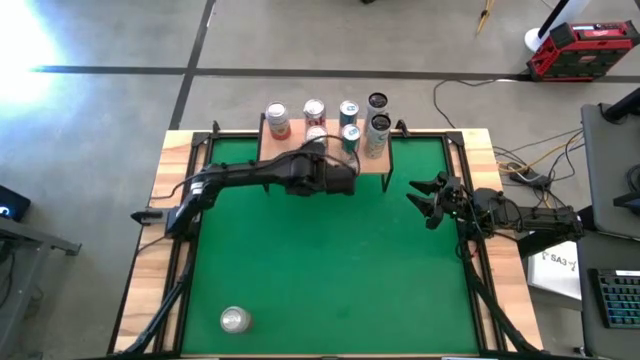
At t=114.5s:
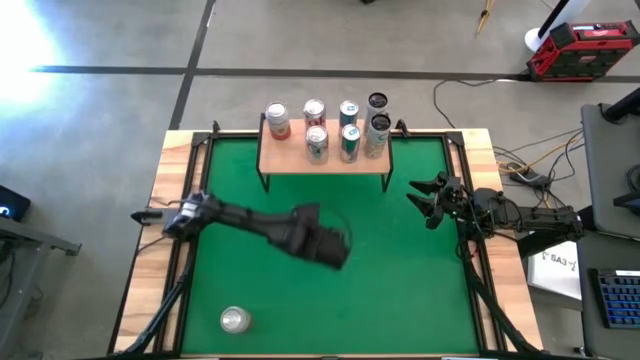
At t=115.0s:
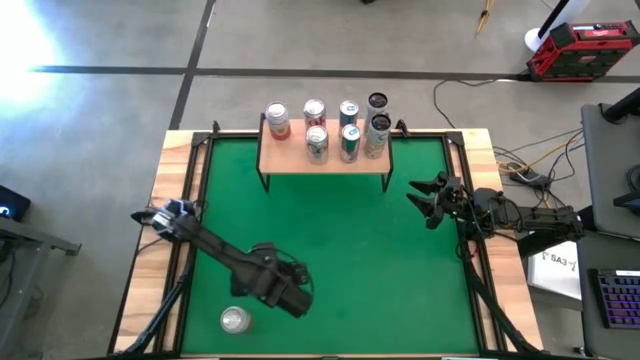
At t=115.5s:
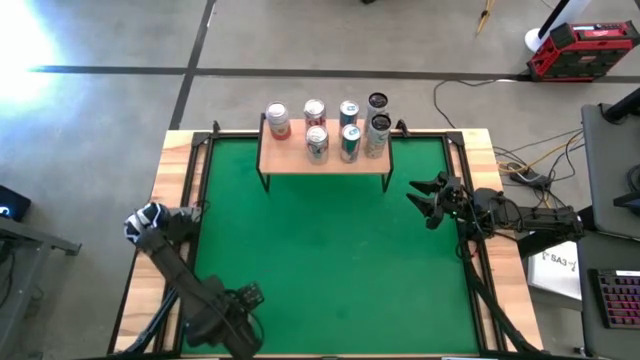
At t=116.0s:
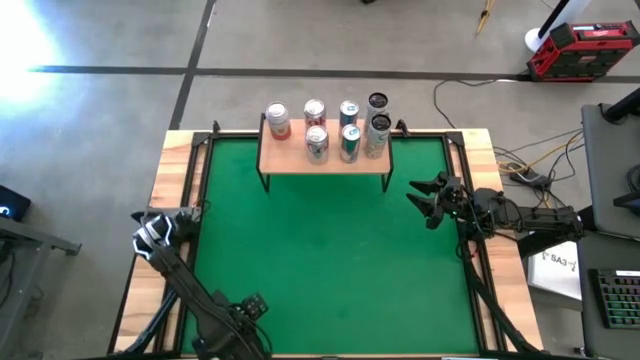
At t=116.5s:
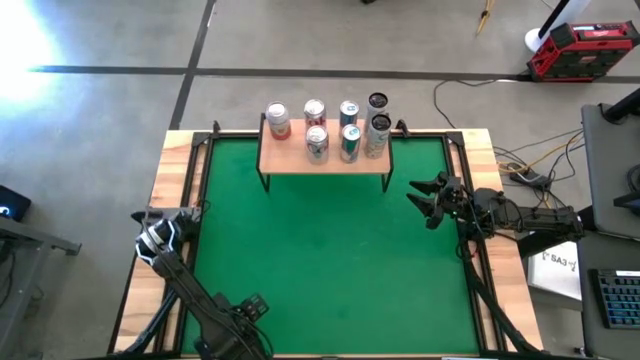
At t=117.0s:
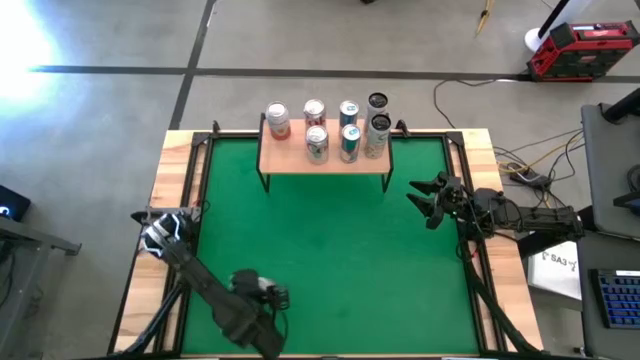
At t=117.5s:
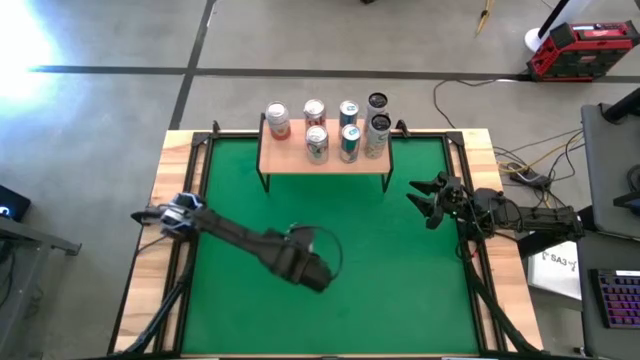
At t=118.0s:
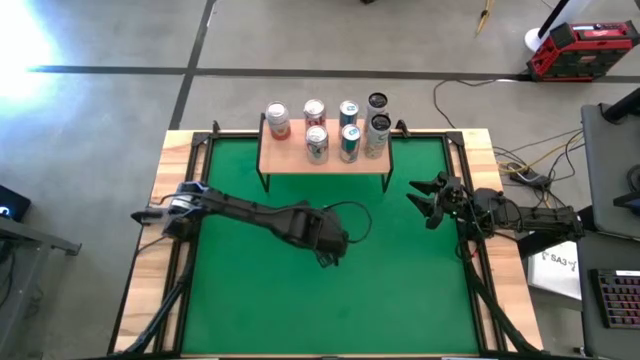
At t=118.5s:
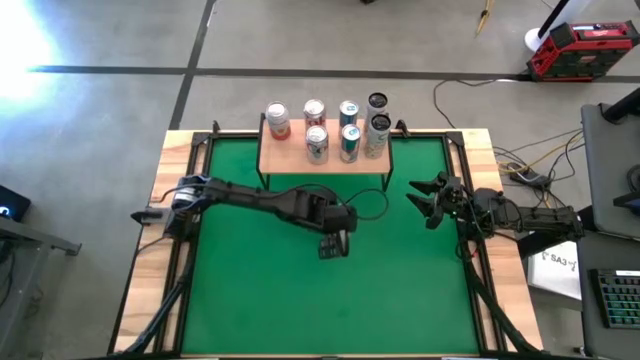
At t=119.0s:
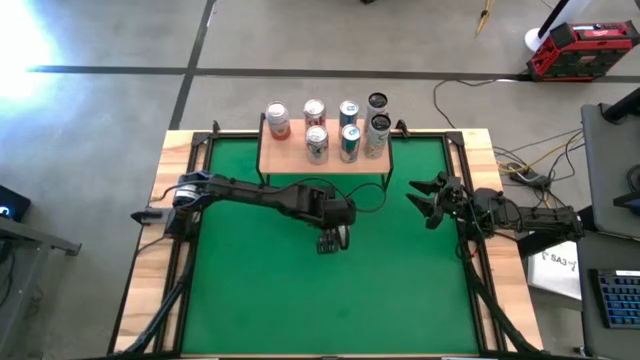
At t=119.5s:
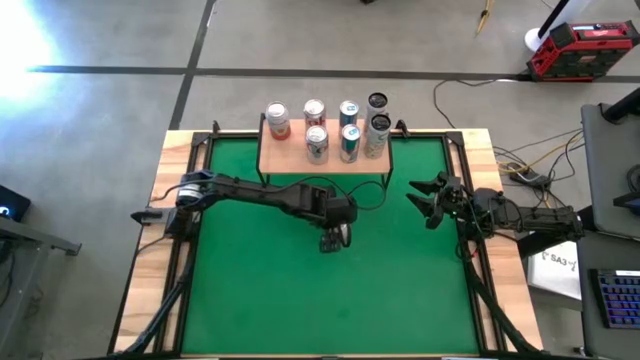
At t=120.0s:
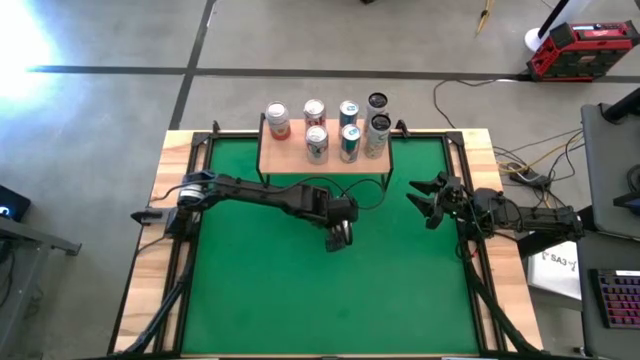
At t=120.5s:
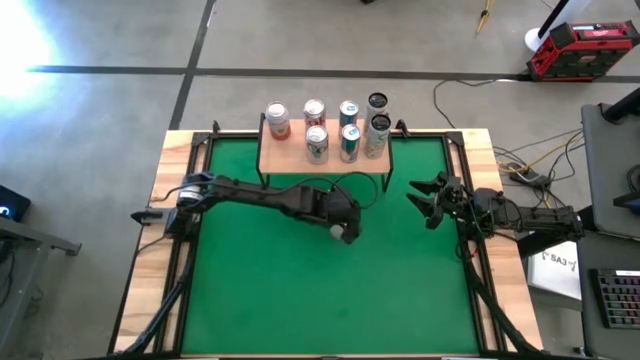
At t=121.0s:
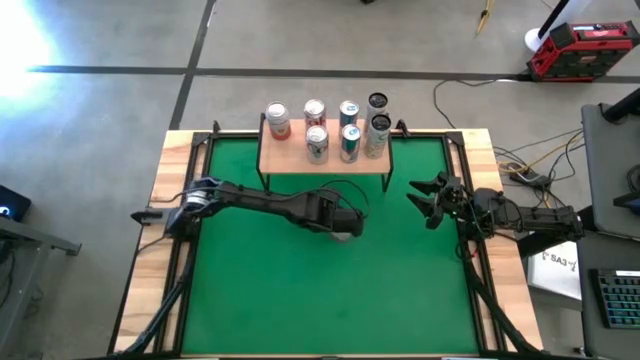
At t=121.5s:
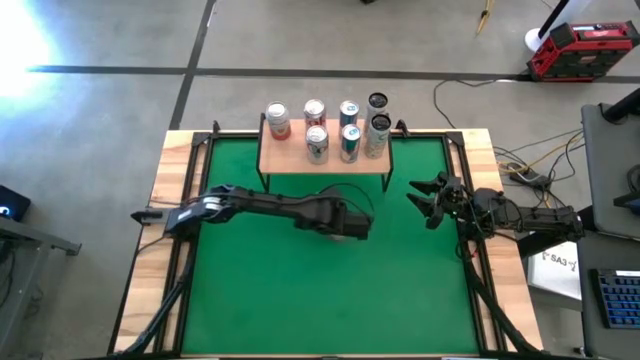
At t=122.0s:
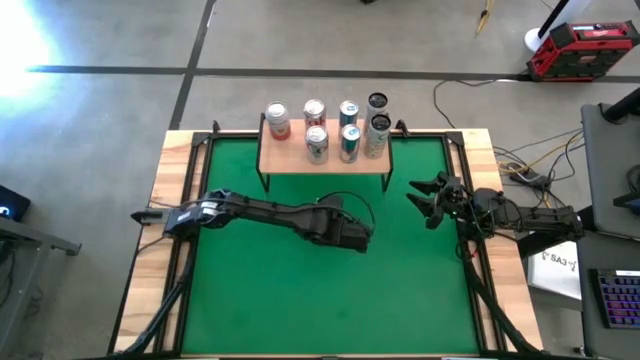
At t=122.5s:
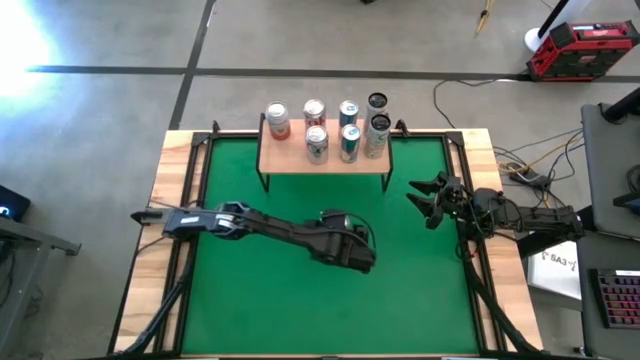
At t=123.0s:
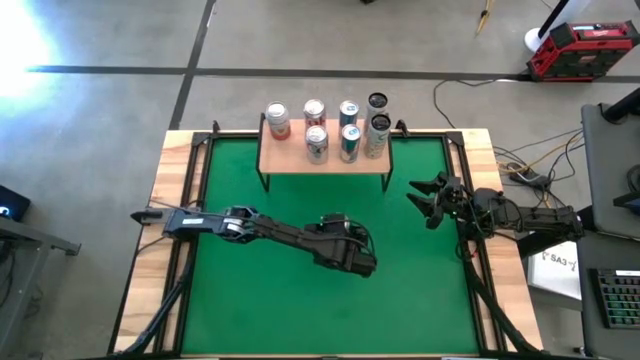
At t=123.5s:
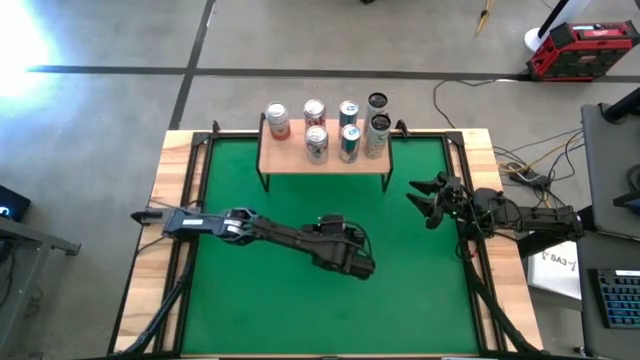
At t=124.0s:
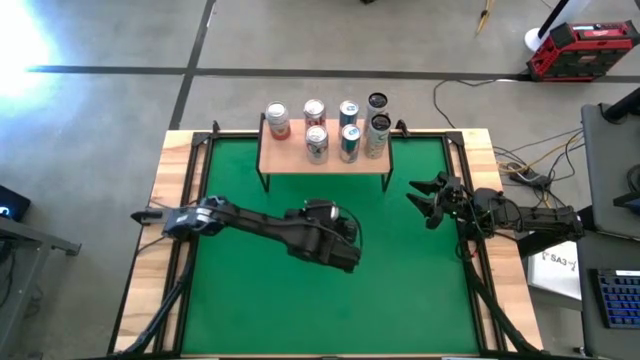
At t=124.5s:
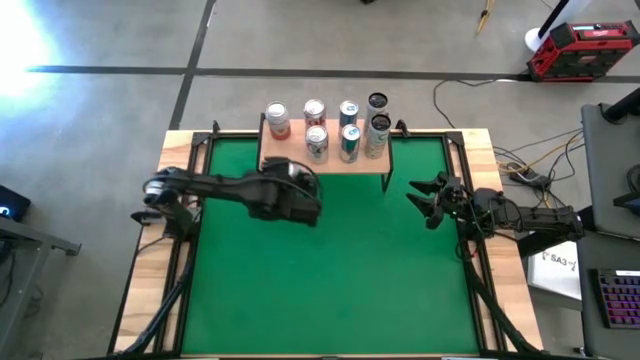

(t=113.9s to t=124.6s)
Task: Place canned beverage on shelf
Put the pink-white soda can on the shelf aligned with the other pink-white soda can

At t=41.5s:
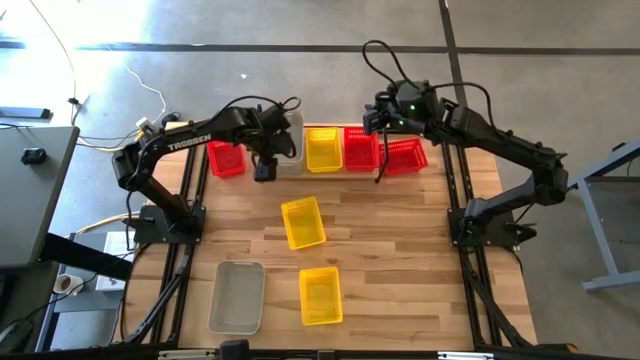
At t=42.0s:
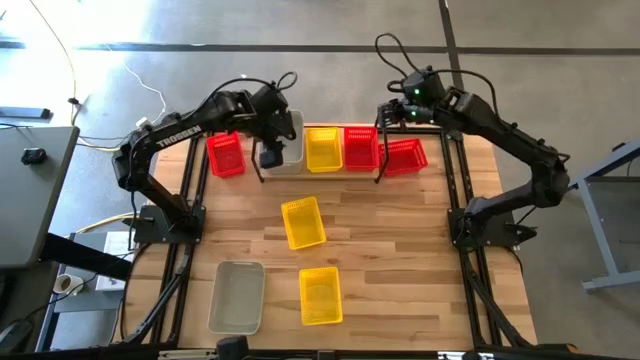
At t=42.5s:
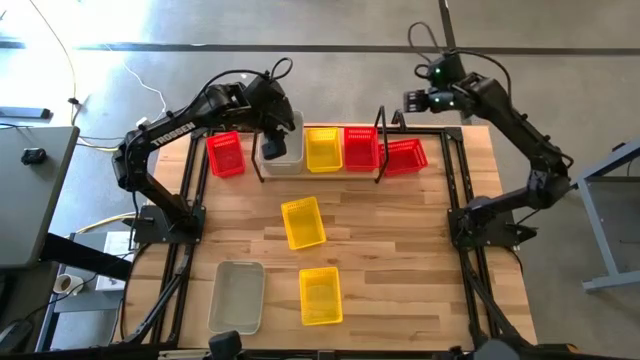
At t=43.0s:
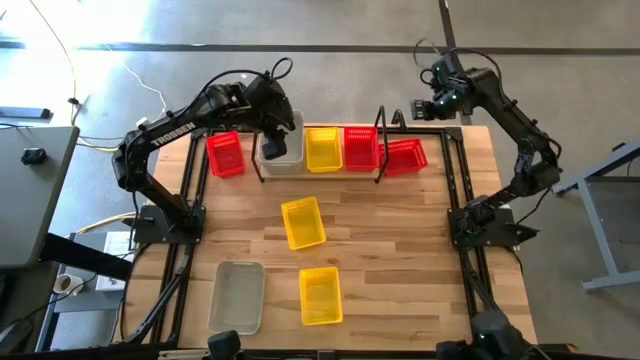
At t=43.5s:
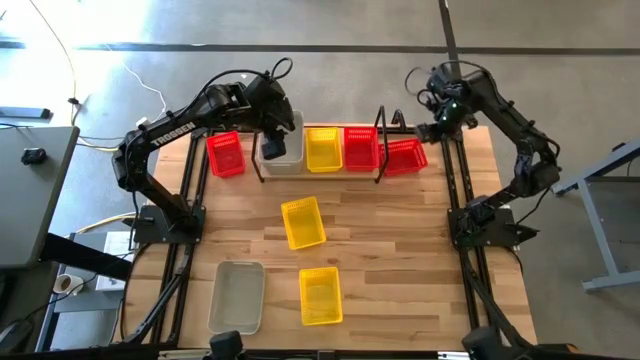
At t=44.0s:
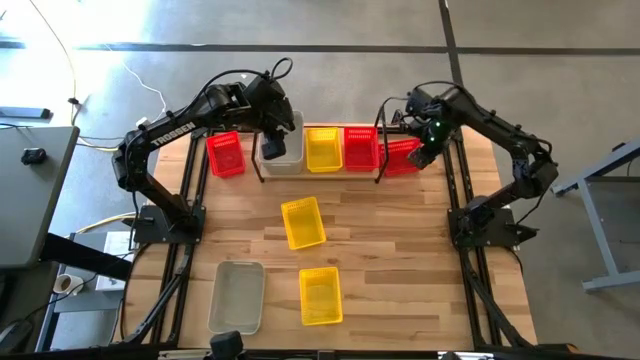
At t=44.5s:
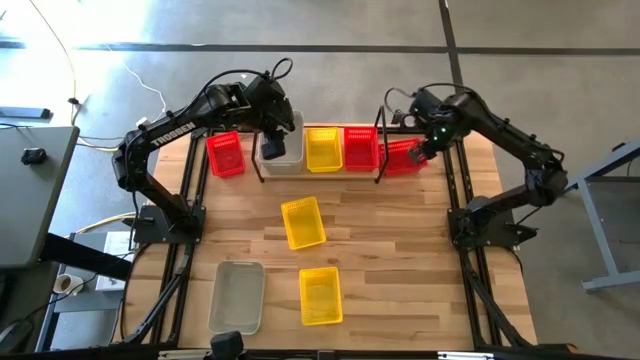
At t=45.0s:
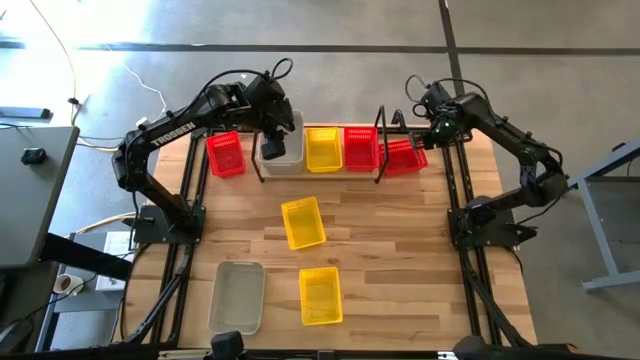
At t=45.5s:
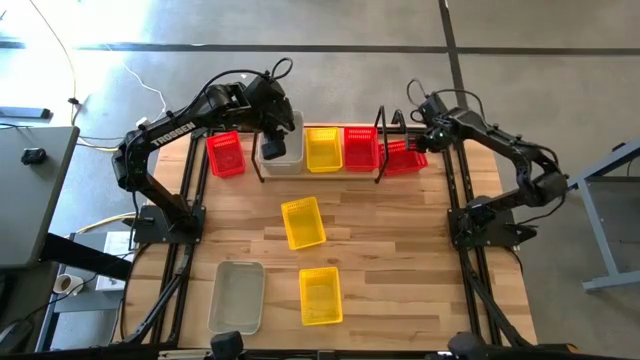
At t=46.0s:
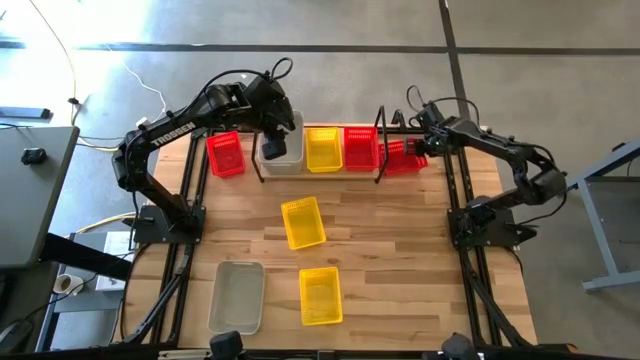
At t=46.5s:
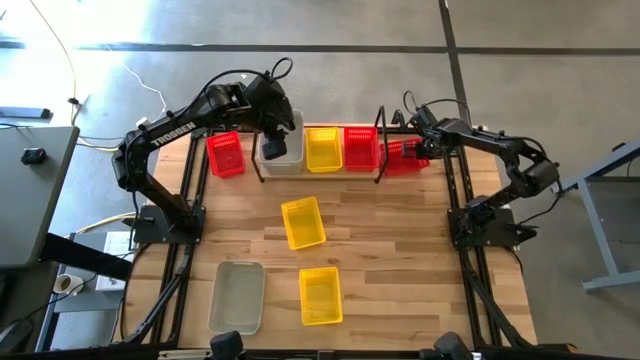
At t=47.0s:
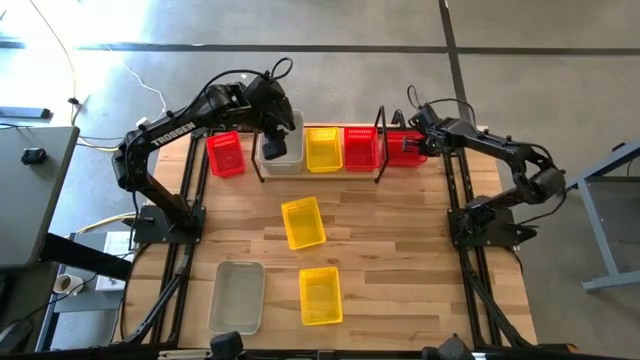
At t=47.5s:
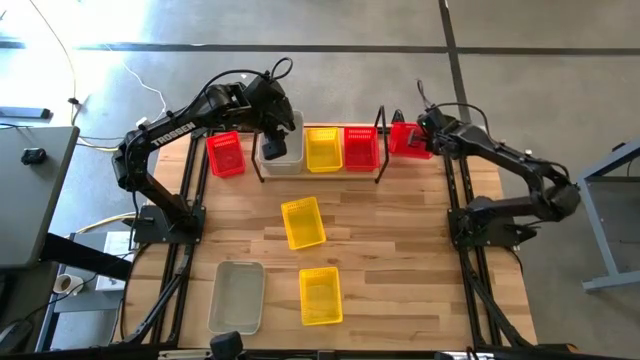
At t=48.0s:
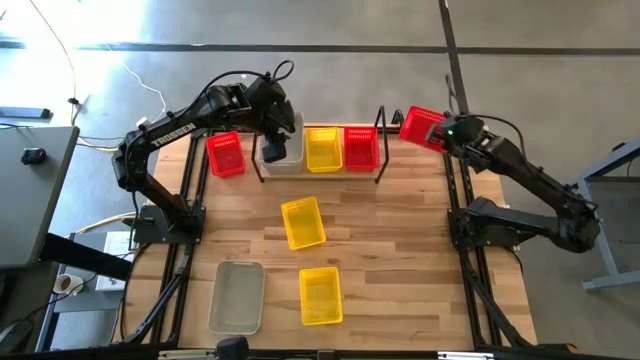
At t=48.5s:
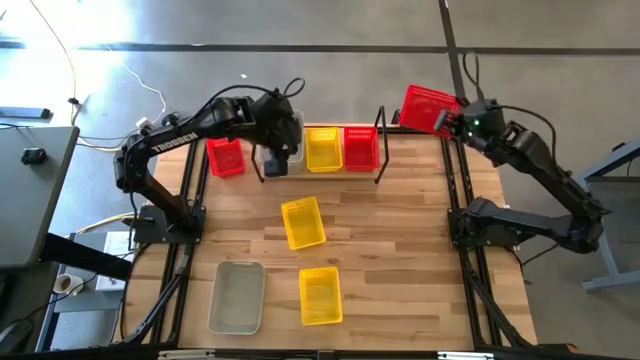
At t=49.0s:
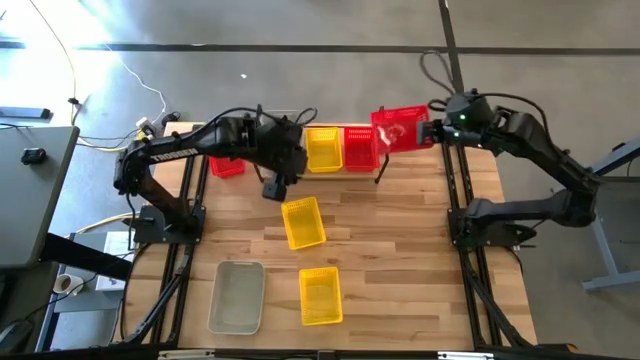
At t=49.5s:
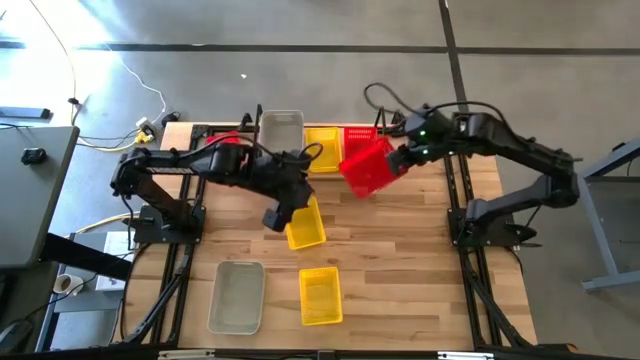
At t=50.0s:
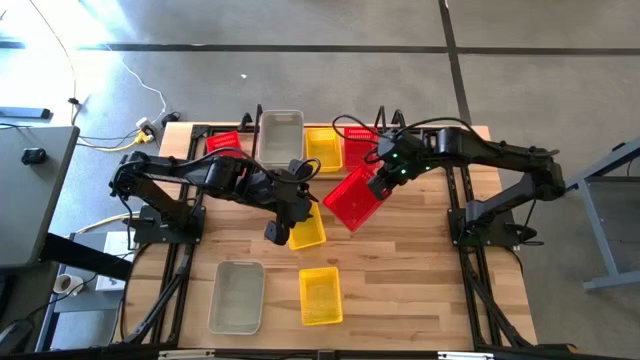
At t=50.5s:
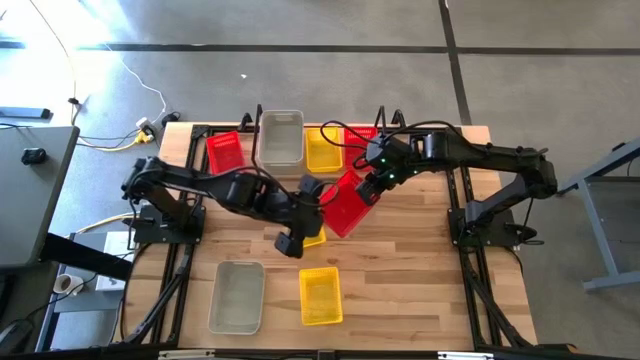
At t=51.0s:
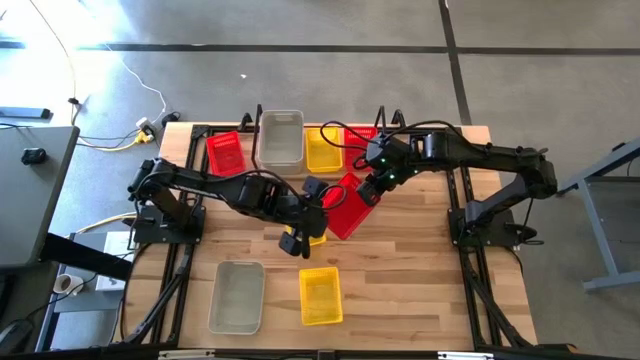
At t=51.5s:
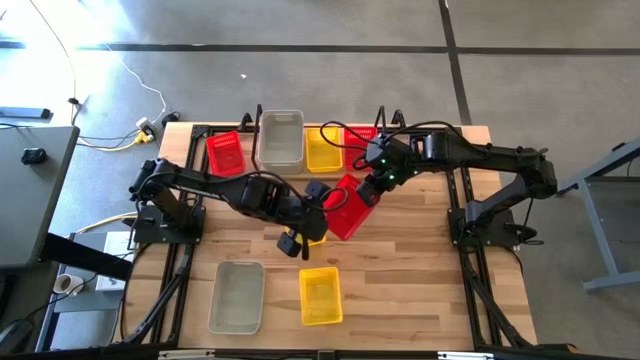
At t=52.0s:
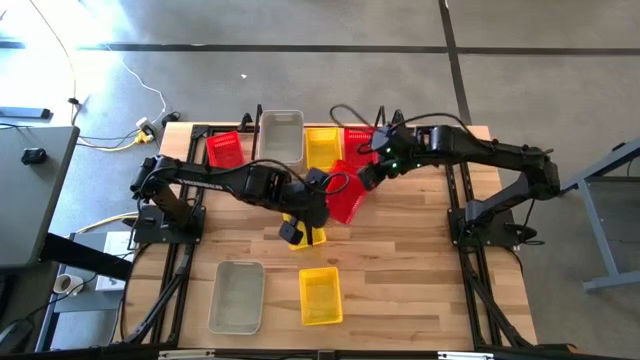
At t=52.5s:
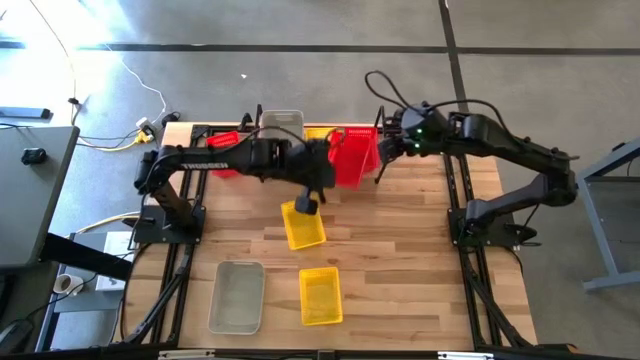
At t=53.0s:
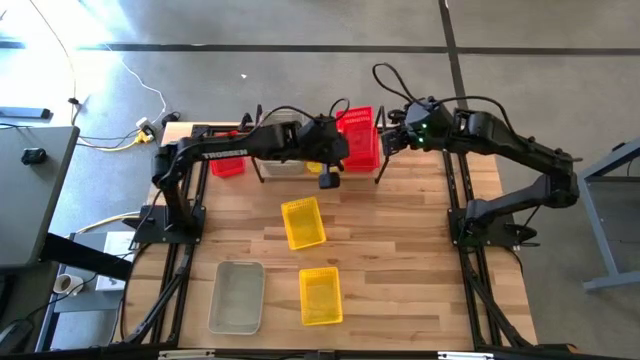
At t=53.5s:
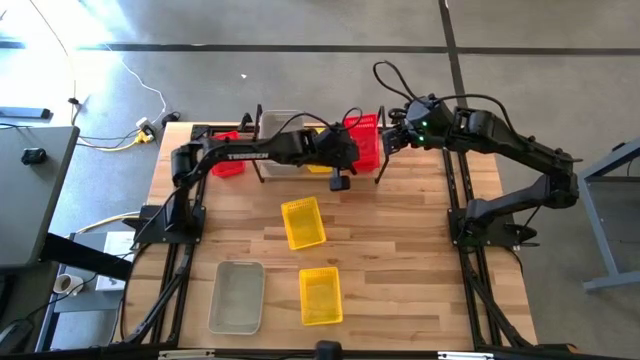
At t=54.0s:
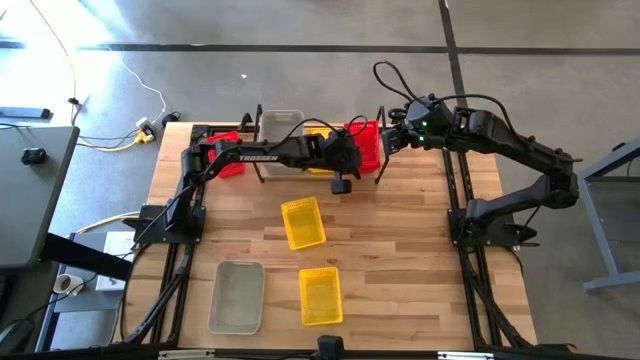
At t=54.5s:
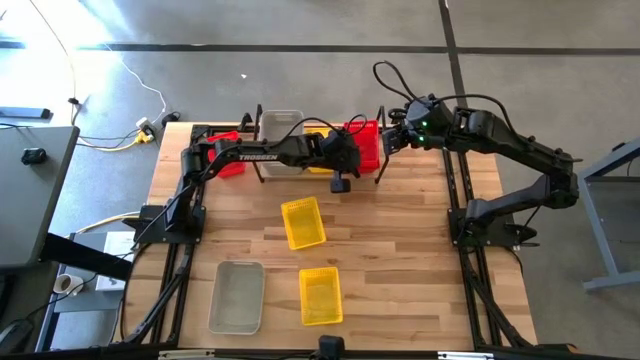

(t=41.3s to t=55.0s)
Task: Stack baskets on shelf by color
Stack the right red bin on the red bin on the shelf
